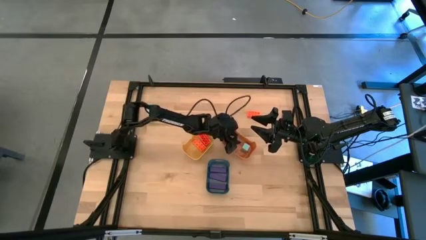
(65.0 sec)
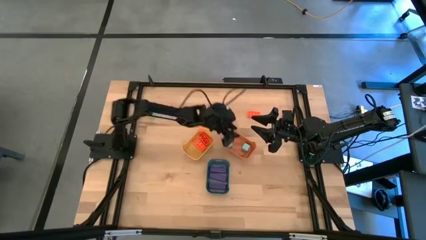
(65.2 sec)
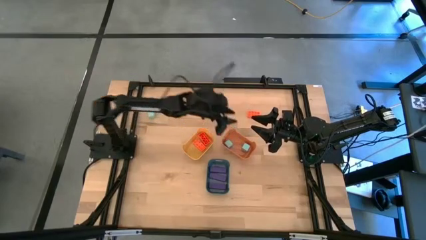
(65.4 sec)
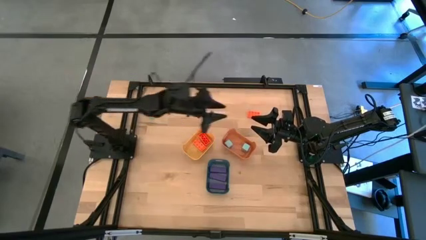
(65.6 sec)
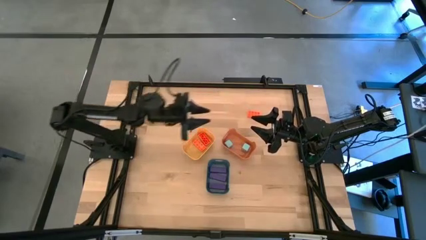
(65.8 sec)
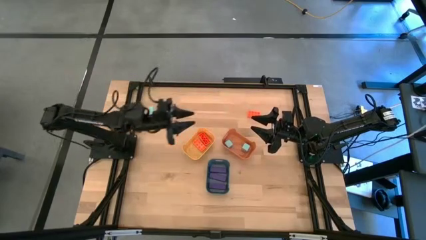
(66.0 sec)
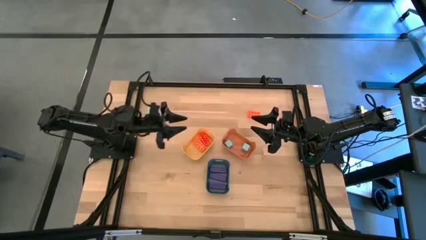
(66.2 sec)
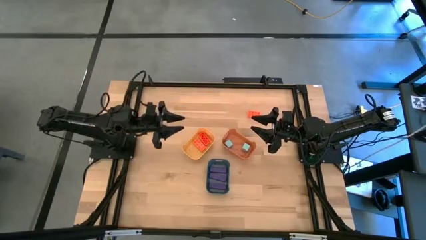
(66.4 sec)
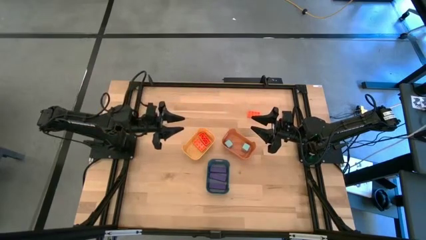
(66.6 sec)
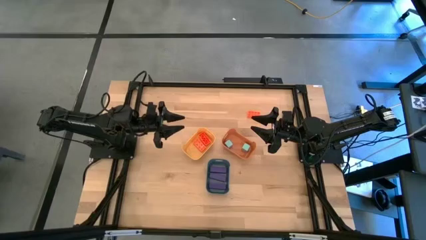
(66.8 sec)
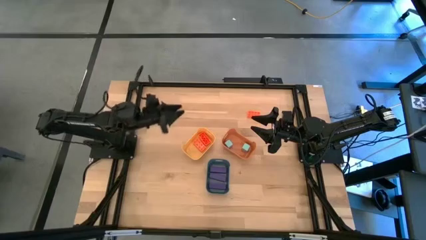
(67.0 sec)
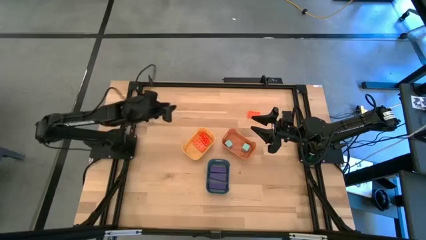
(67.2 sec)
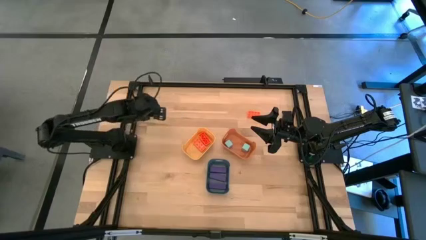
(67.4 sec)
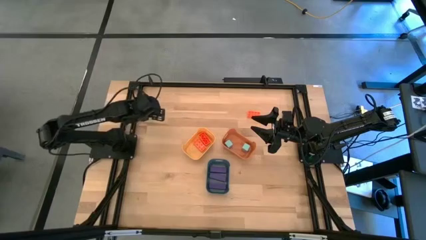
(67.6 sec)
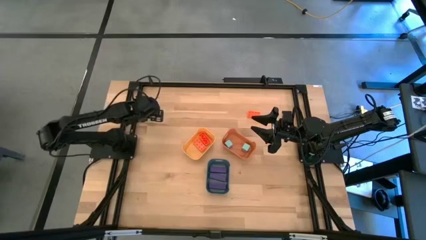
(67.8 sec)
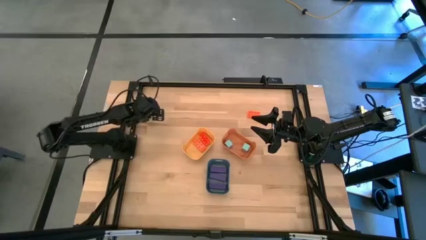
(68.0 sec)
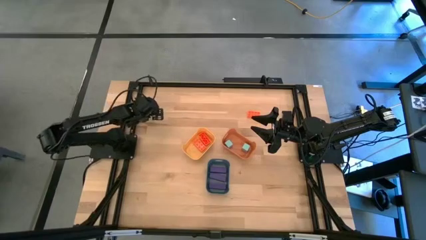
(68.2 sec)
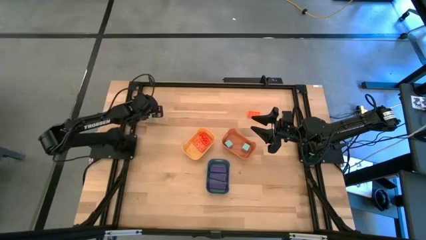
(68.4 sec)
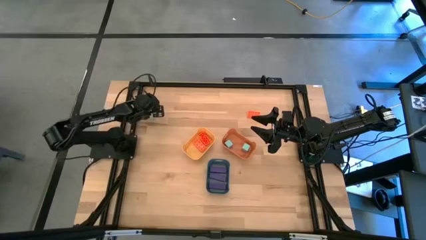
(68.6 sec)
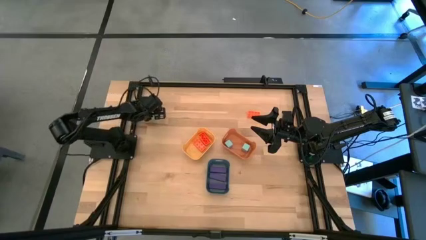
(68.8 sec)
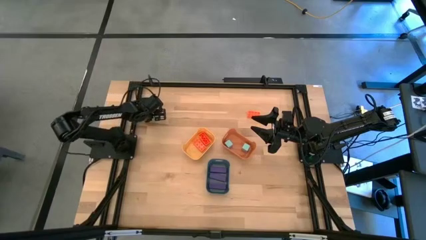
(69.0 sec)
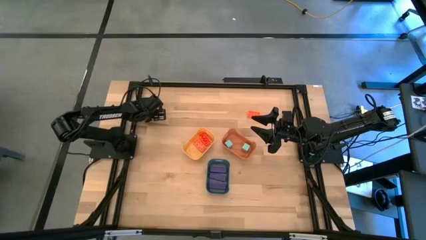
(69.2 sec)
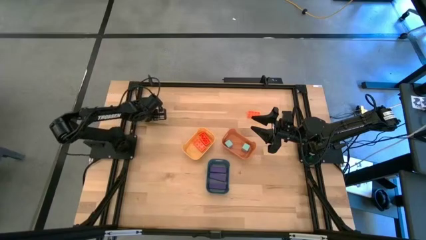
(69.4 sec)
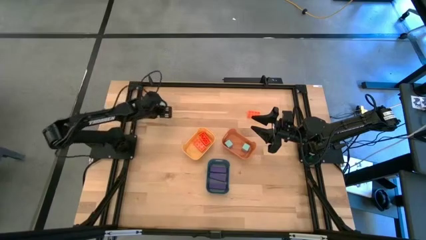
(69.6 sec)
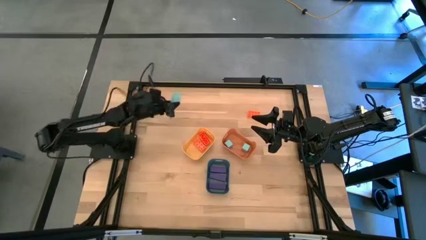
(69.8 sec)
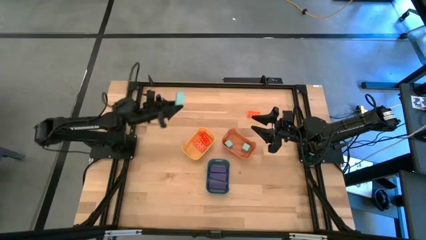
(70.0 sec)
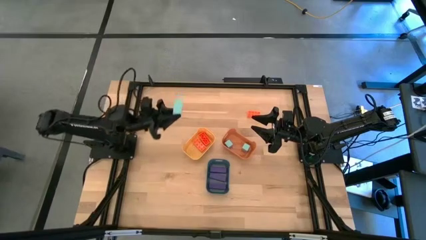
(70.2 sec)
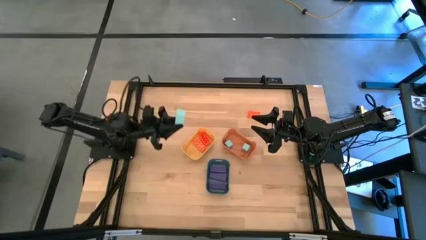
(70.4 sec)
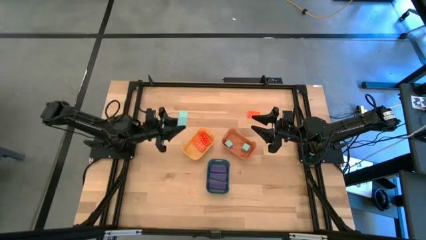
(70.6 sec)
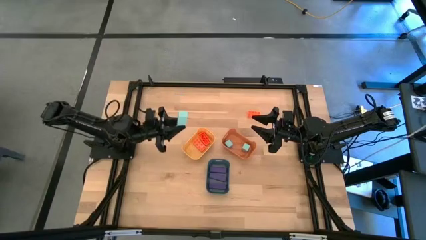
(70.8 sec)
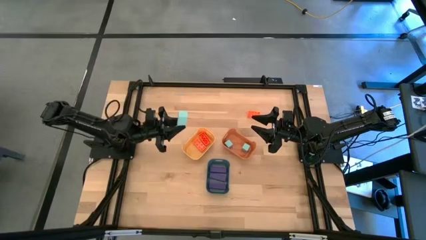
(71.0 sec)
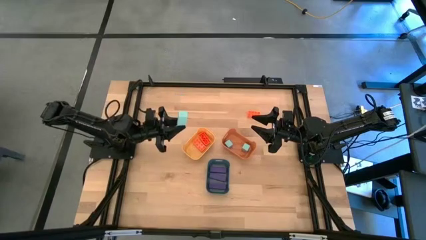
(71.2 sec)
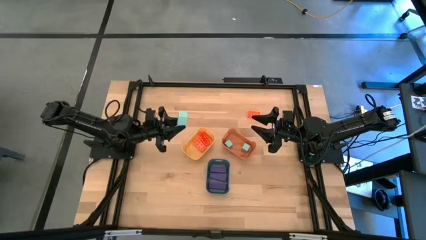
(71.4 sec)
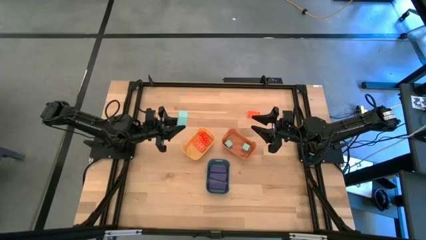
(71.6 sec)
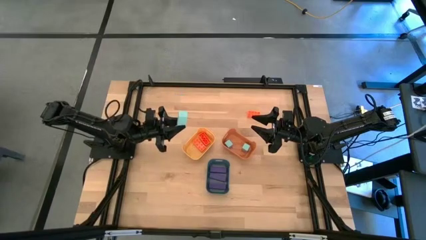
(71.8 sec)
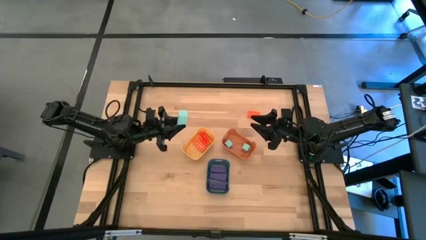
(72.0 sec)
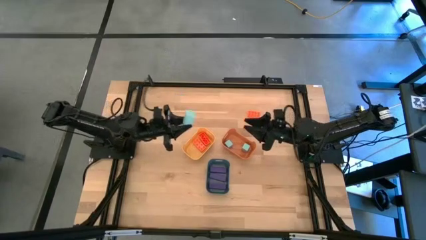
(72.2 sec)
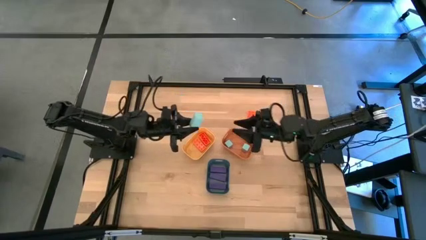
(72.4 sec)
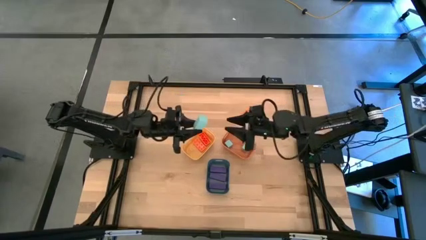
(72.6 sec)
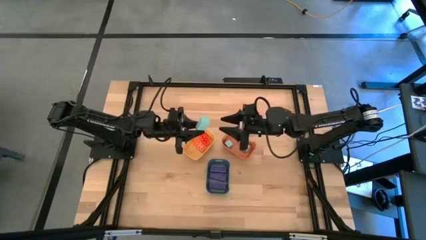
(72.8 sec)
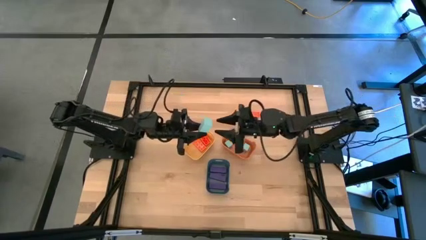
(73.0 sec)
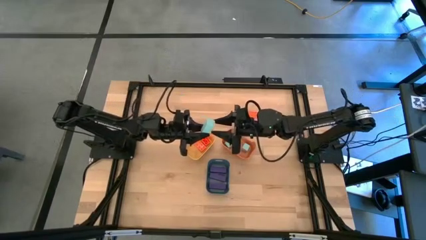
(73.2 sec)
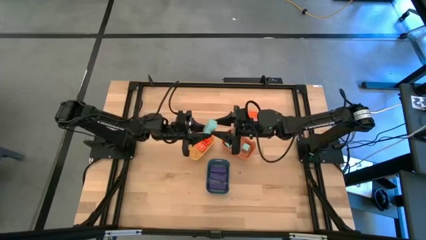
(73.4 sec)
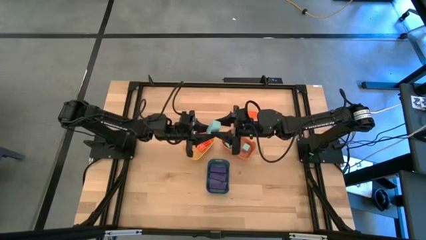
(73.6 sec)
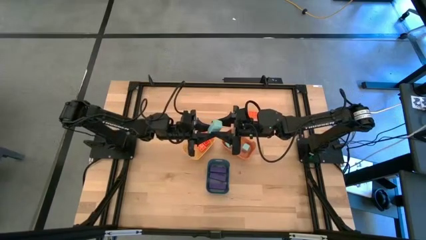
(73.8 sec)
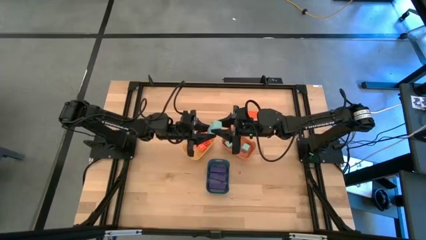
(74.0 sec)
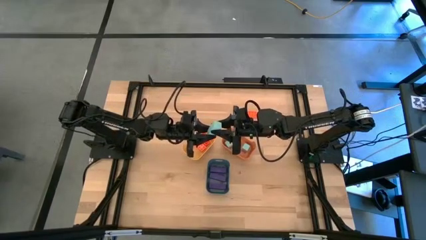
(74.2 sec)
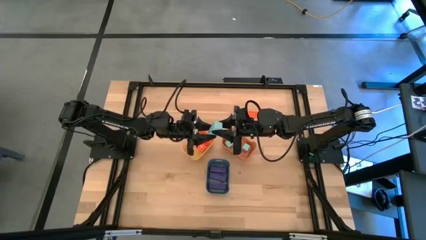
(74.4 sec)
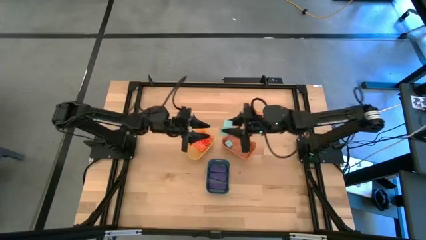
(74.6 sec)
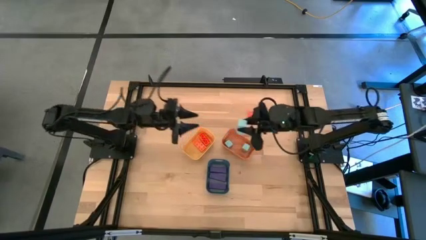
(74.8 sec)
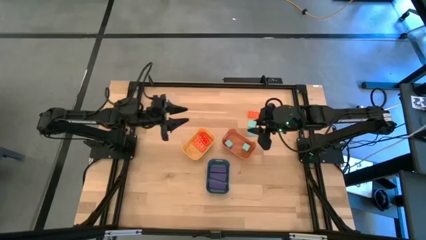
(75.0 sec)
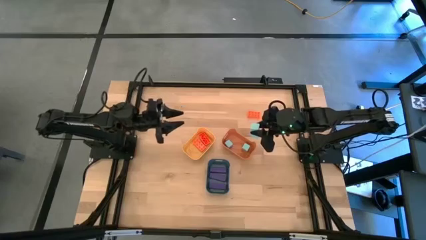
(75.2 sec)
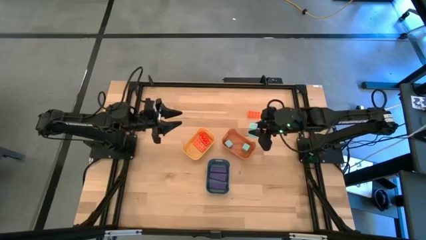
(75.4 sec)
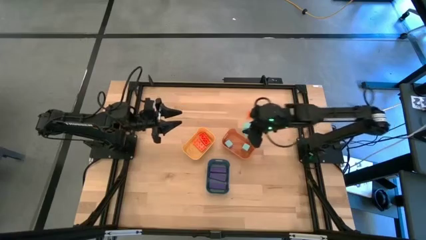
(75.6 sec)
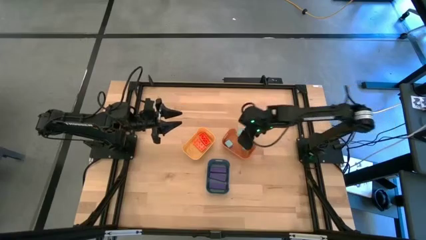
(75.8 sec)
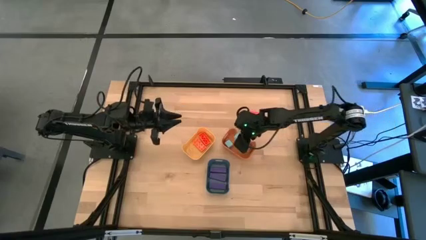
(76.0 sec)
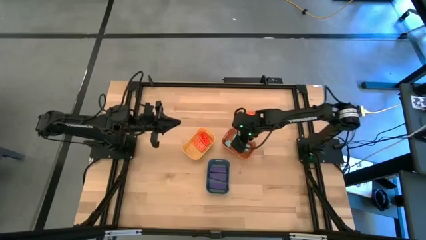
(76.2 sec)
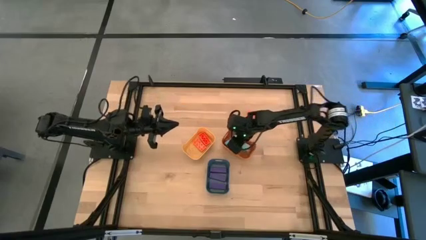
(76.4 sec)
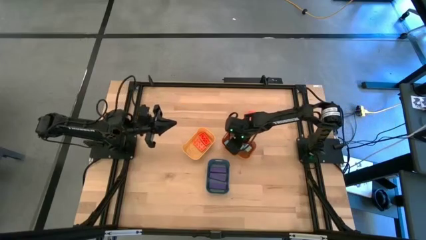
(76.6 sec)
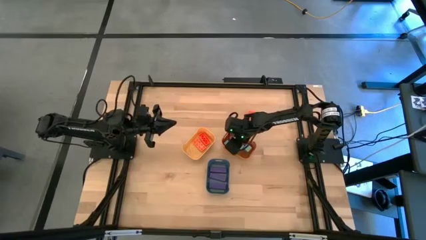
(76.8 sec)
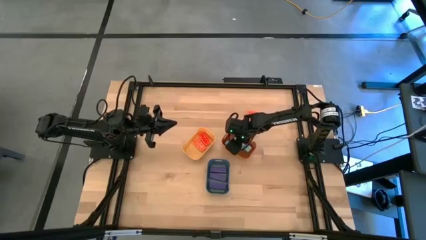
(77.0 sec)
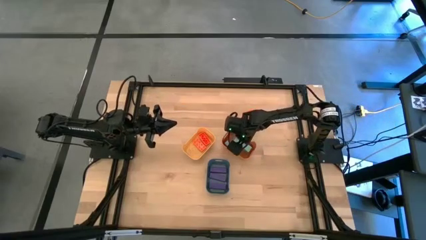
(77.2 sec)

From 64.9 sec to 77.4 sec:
Task: Sort & place blocks by color
Put the light blue block into the orange bin
